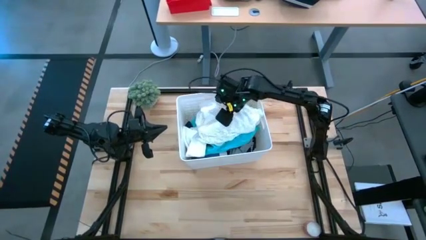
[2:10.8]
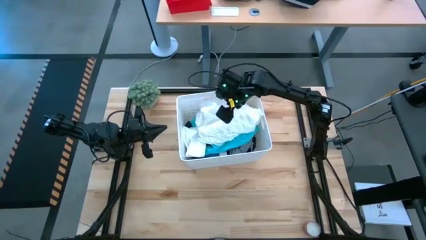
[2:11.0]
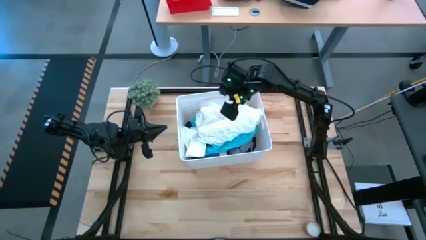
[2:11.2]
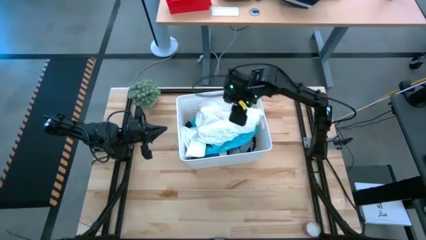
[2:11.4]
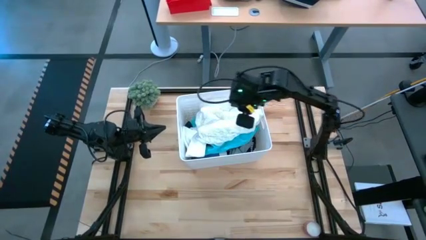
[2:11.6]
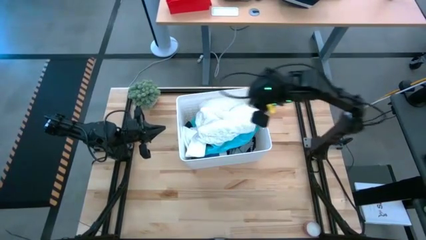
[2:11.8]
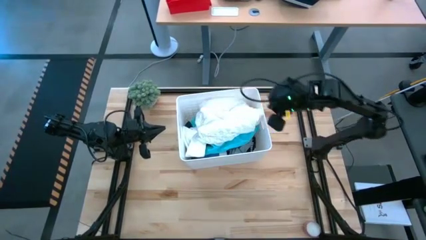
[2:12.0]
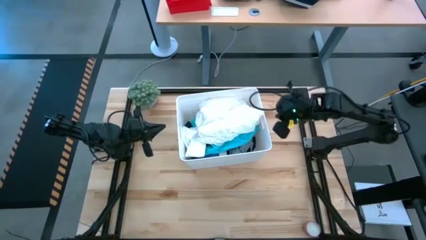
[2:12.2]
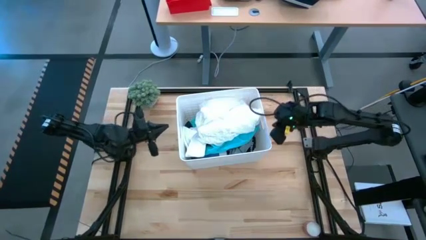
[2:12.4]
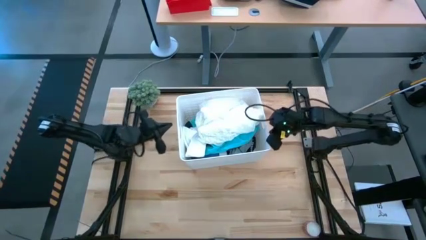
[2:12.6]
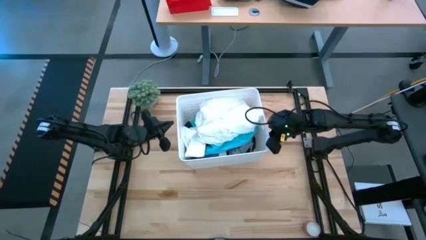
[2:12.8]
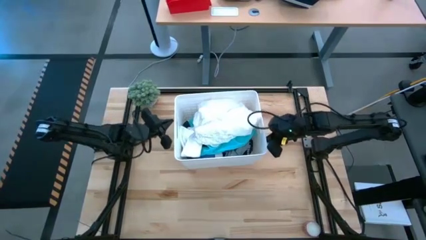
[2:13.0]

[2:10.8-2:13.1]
Task: Sort clothes
Move the white bin to the top of the table

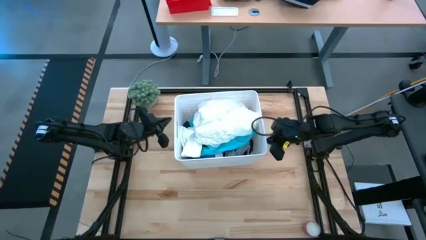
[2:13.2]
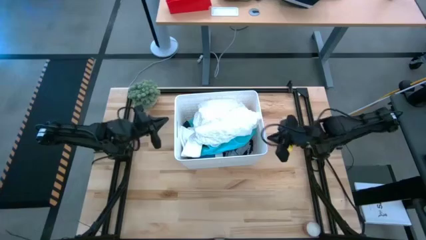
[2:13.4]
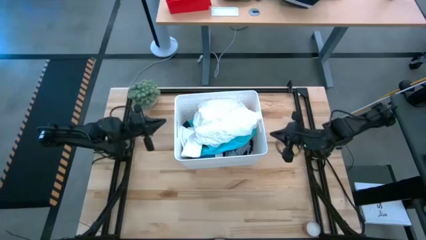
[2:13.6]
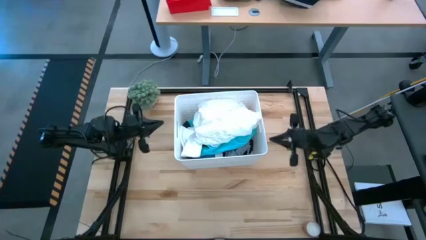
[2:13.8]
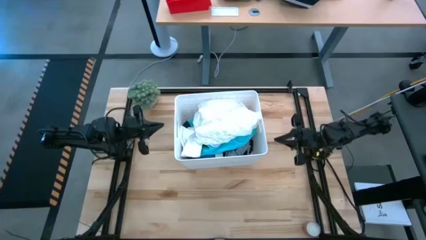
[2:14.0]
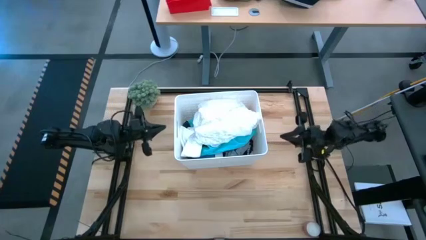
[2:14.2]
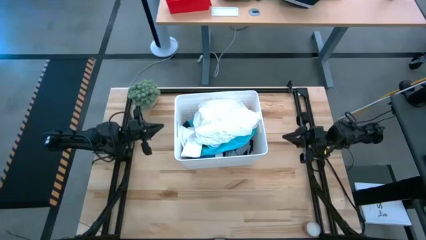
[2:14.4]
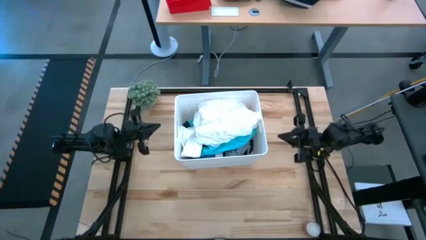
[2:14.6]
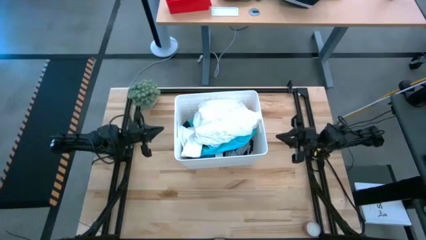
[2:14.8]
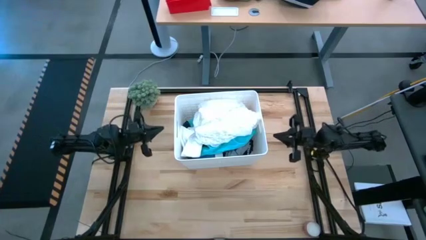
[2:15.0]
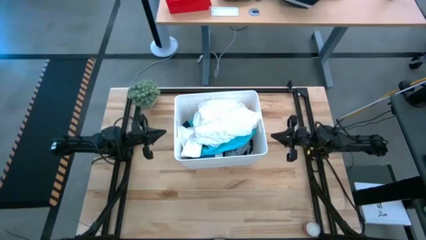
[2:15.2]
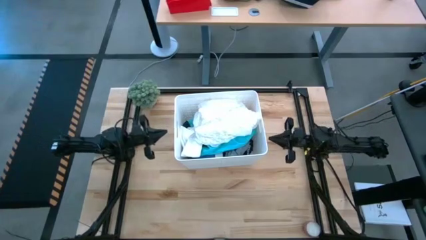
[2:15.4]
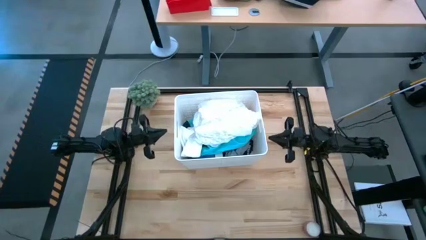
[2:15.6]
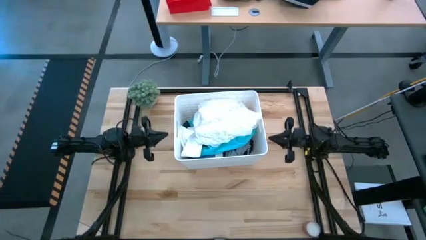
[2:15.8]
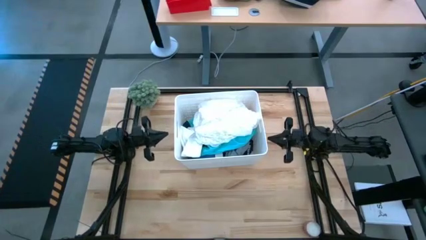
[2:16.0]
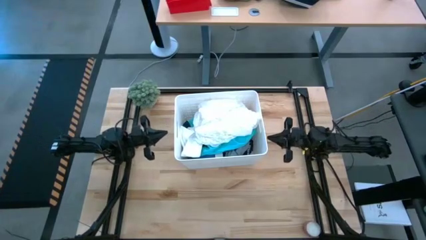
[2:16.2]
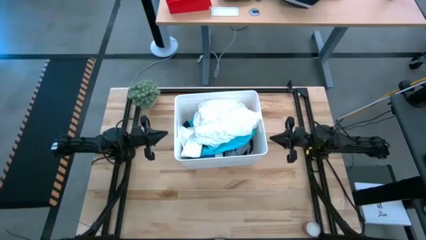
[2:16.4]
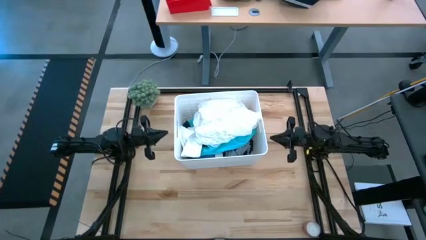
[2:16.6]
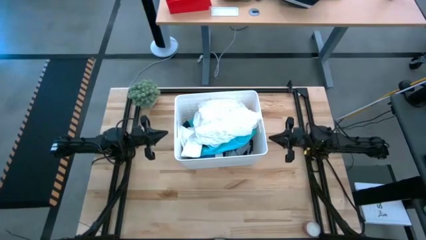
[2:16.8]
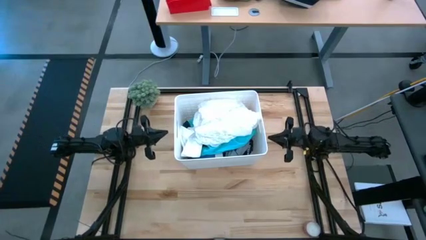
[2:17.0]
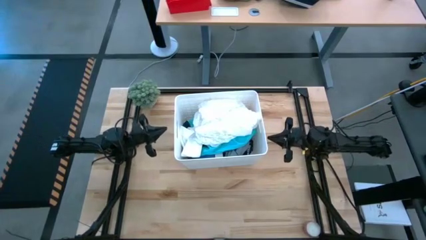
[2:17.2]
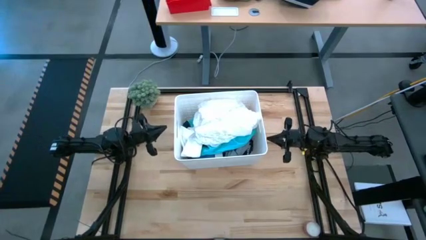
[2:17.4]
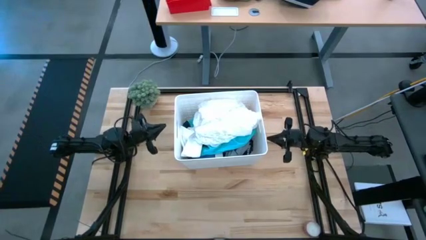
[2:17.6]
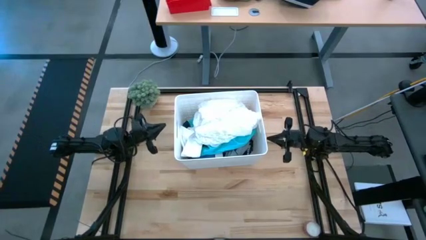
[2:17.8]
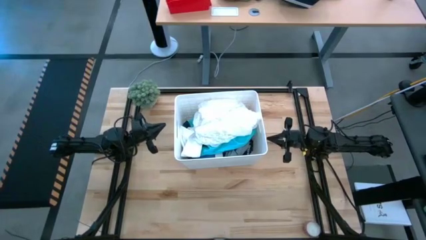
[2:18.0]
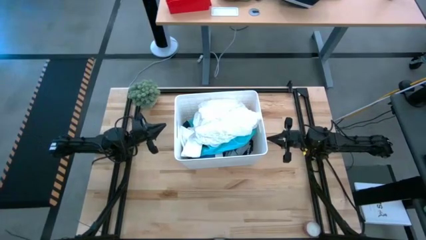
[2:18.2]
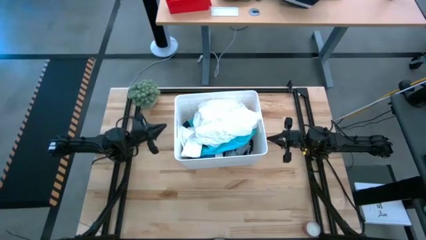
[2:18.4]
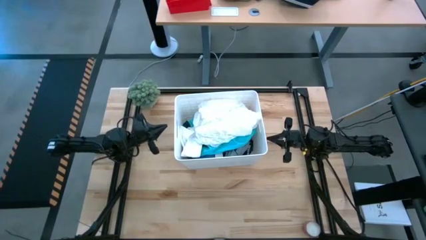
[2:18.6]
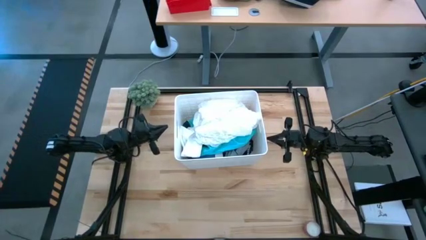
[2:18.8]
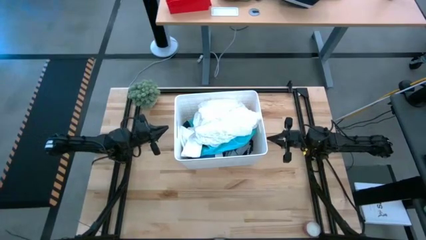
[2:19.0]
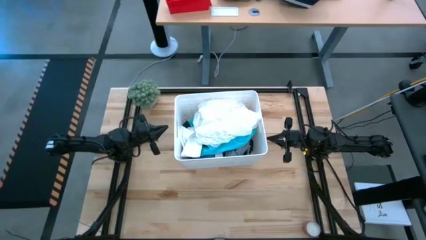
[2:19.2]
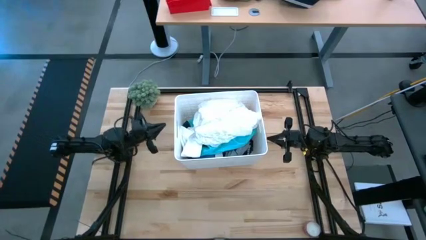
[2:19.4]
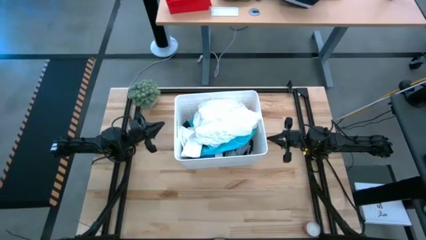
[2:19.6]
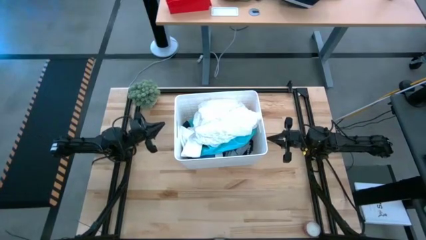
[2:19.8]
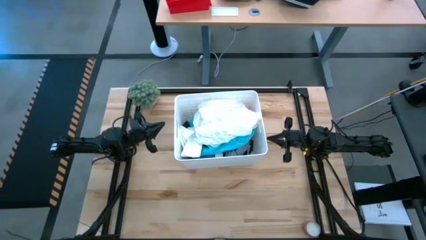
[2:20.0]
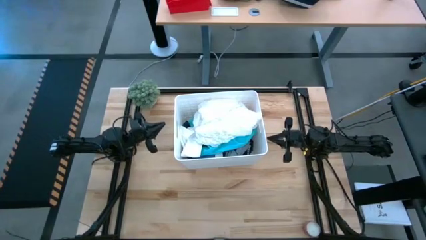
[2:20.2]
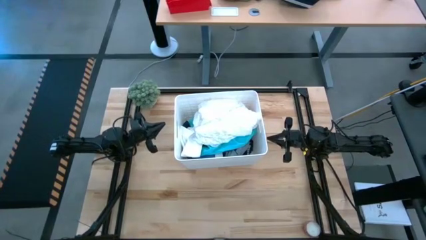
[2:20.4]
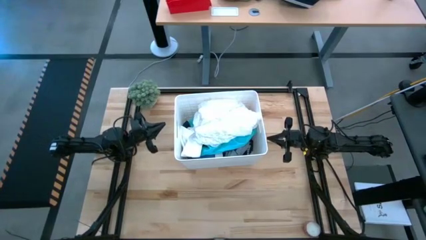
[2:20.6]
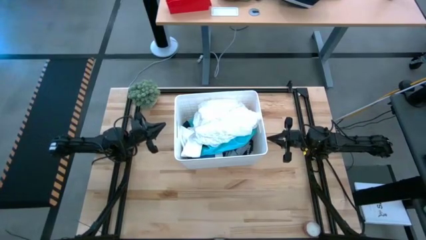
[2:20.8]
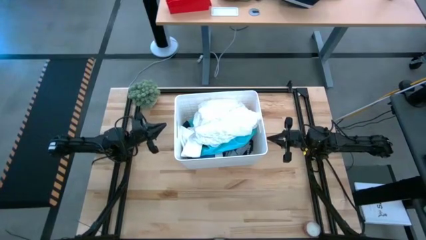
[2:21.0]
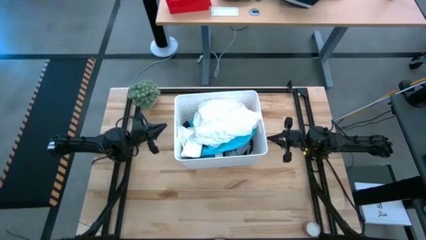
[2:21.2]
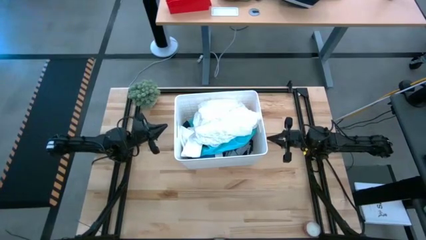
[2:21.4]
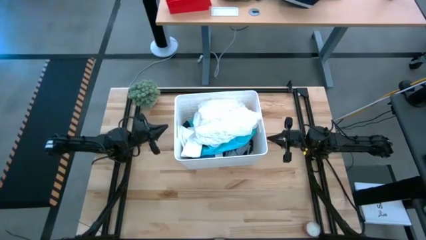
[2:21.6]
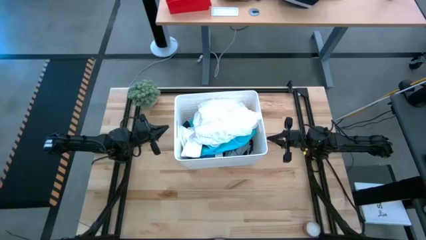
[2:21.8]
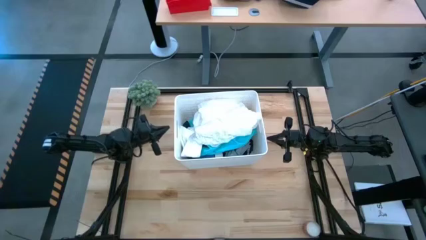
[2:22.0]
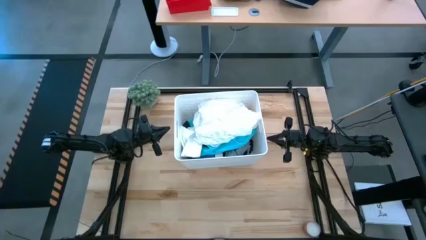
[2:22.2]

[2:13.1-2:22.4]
Return to Home Position
